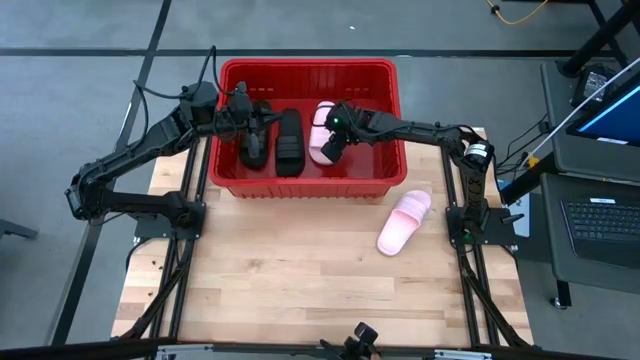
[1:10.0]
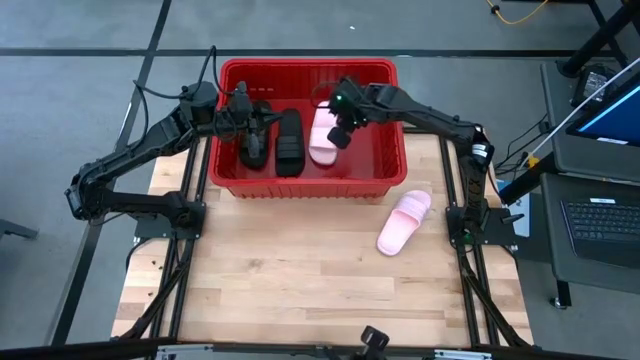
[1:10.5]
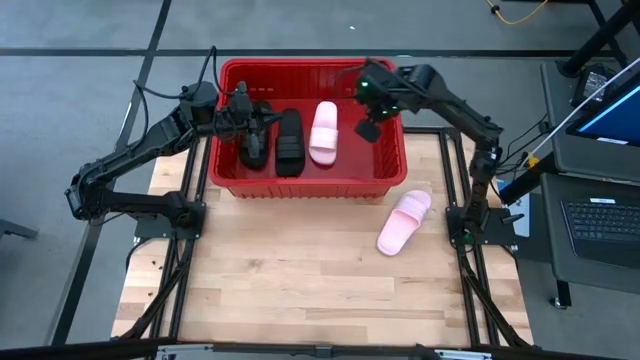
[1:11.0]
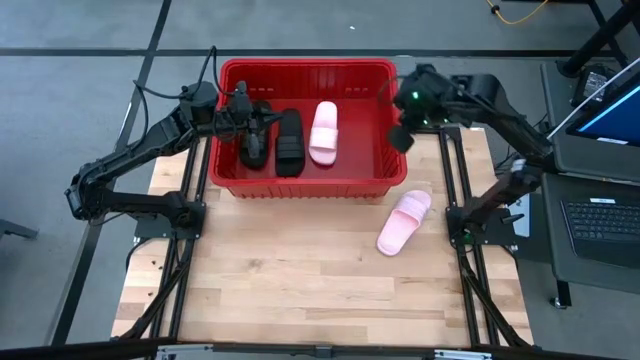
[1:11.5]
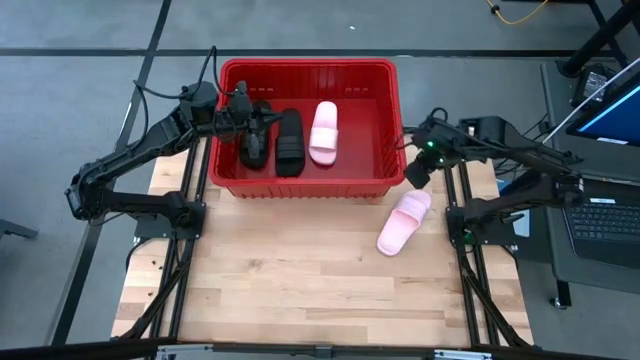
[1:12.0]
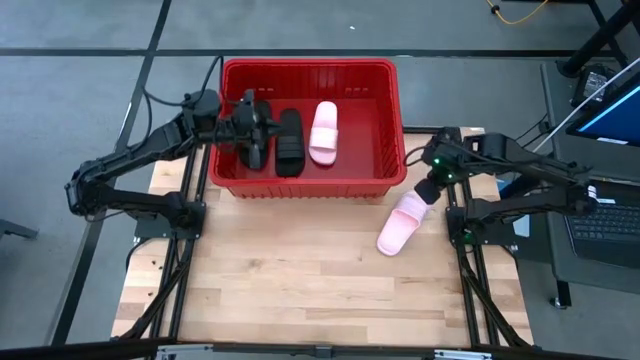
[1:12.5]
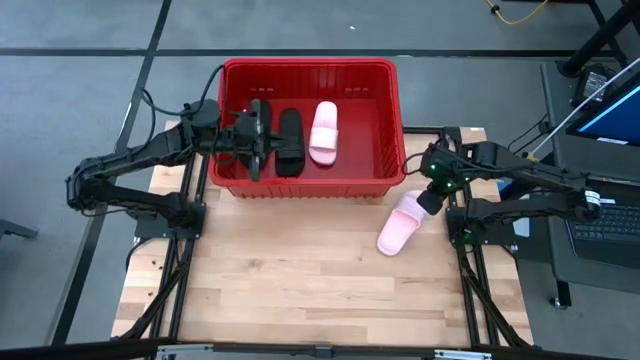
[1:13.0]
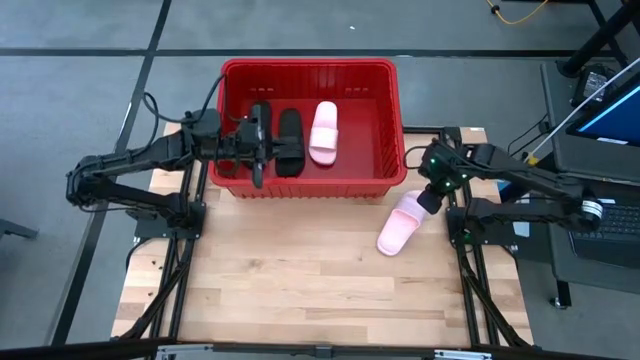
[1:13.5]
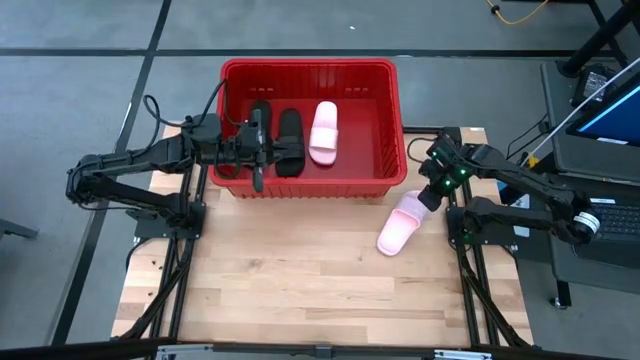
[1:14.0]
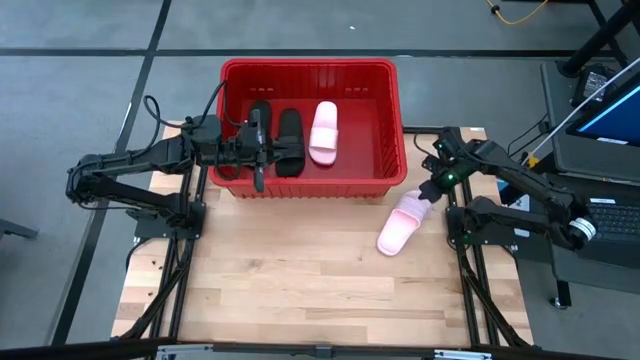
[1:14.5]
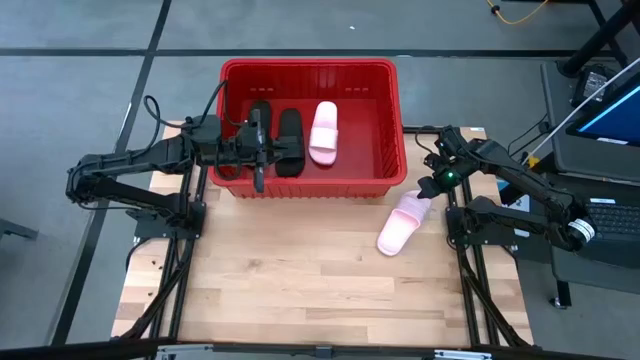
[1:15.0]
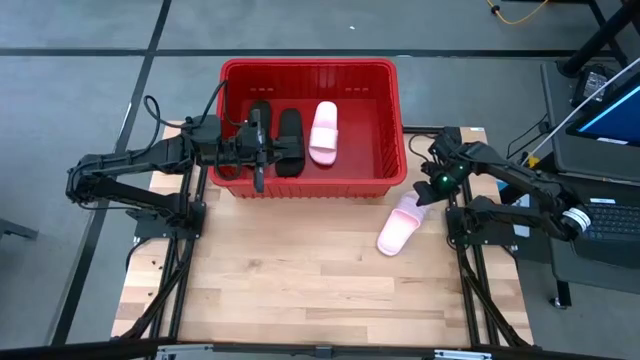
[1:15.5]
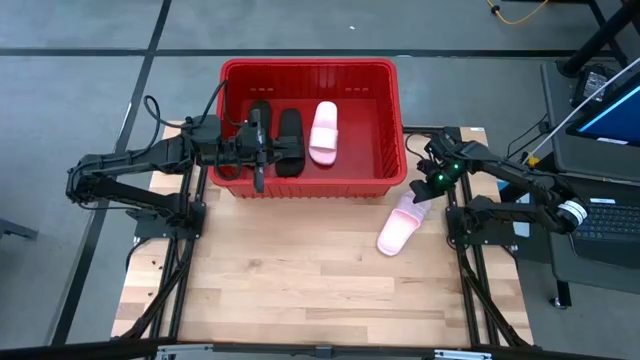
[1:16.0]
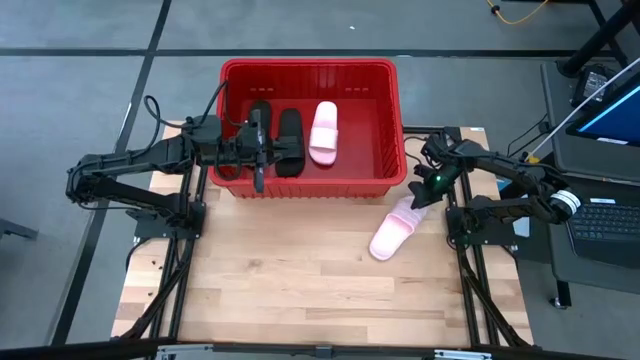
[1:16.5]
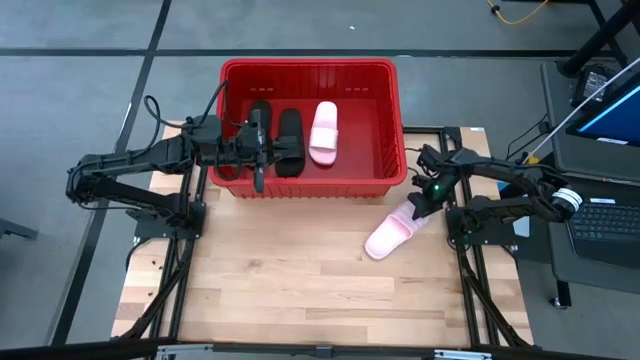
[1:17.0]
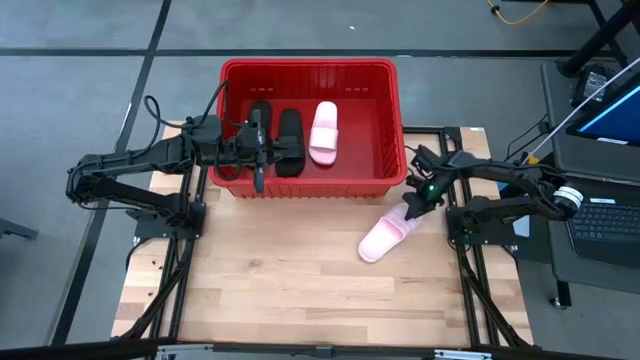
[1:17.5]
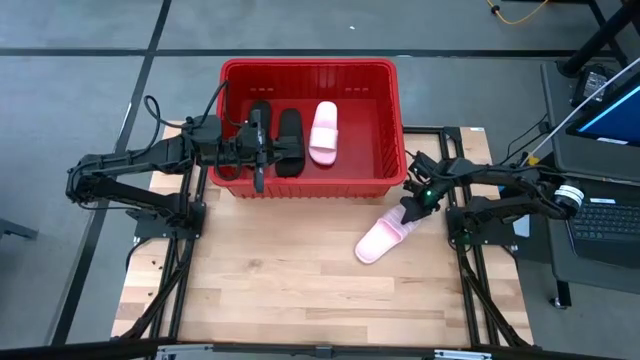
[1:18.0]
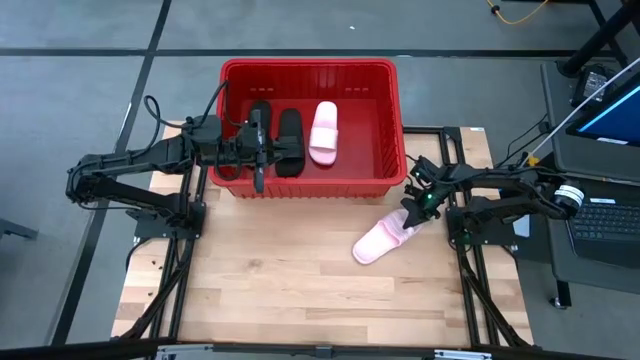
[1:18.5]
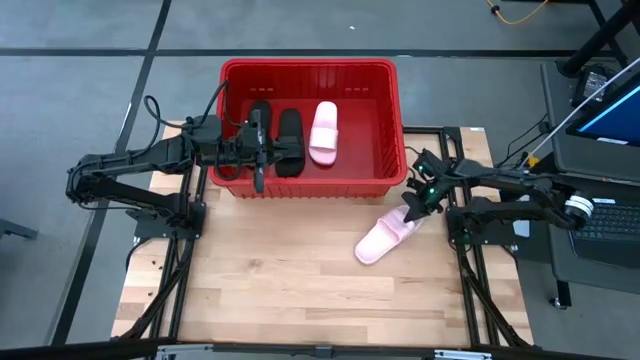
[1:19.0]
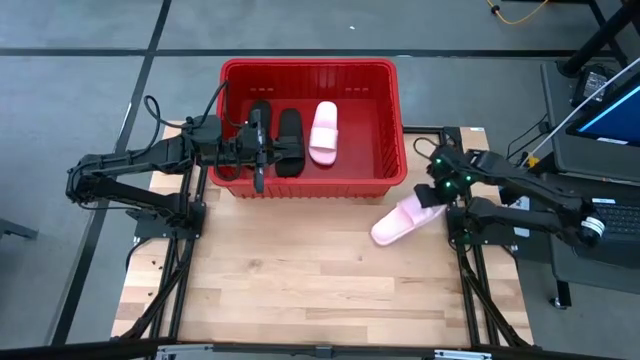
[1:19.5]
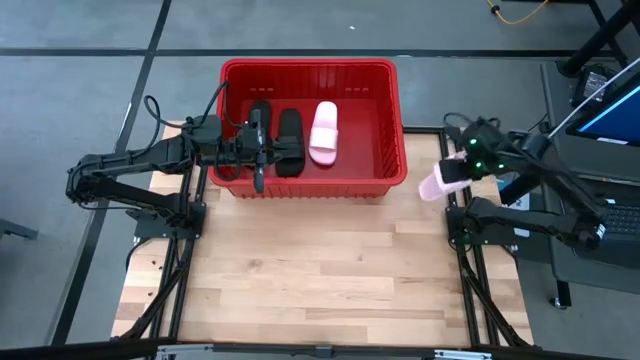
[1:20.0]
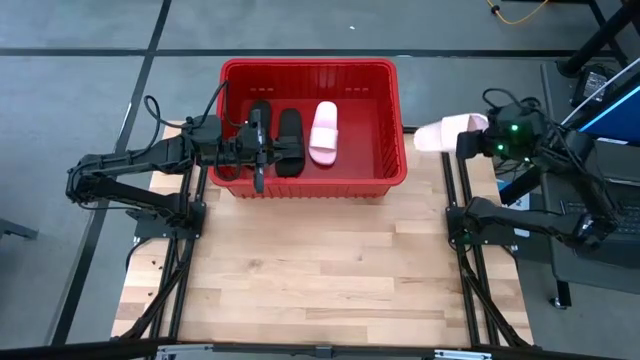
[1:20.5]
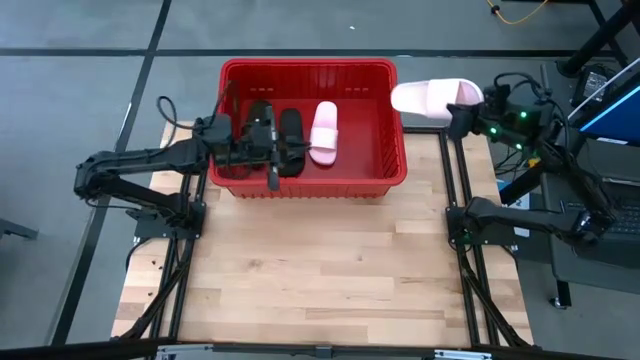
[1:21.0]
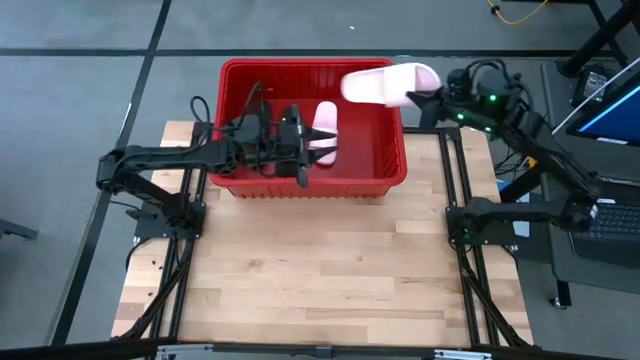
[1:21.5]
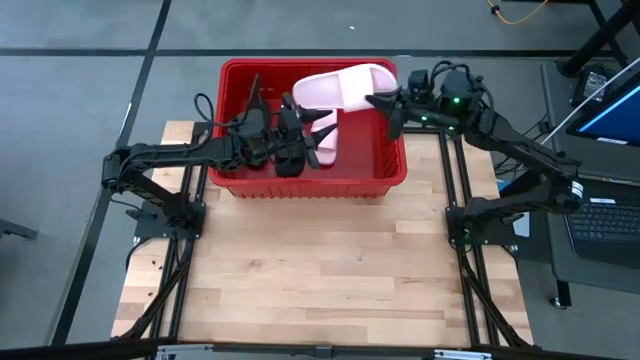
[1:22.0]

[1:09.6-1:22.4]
Task: Pick and place slides into bin
Put the pink slide into the red bin
